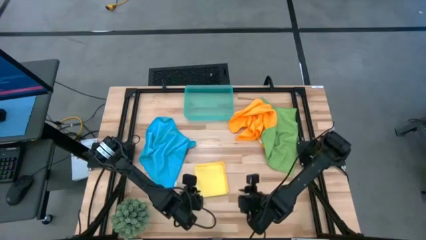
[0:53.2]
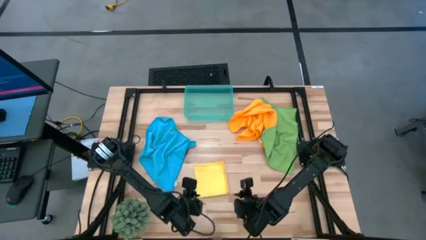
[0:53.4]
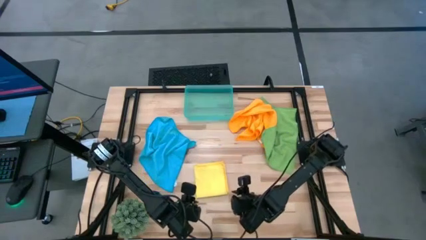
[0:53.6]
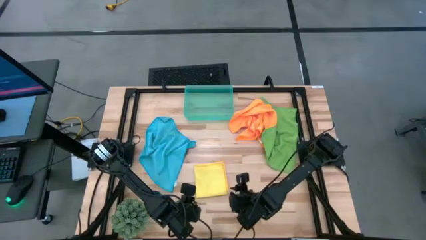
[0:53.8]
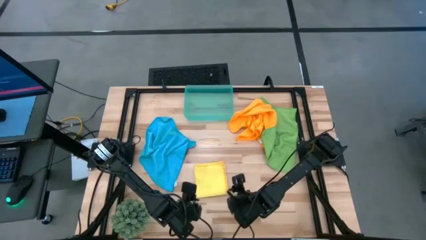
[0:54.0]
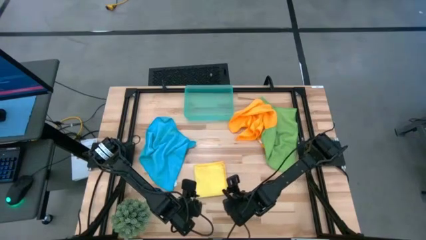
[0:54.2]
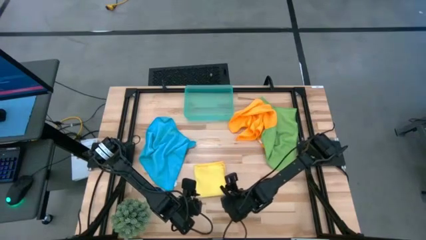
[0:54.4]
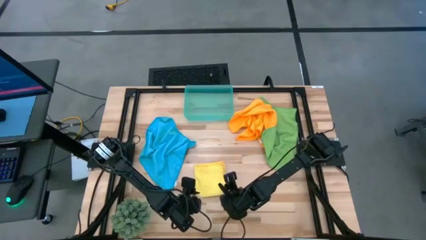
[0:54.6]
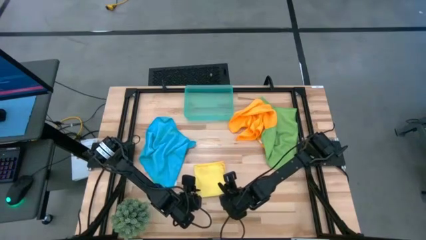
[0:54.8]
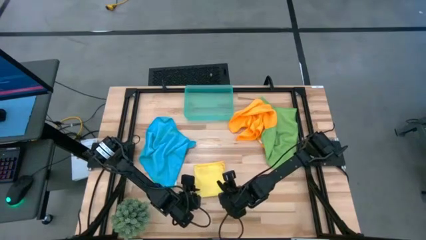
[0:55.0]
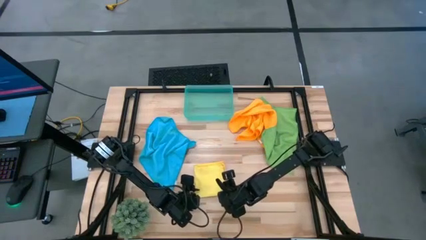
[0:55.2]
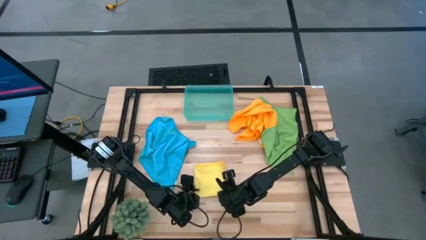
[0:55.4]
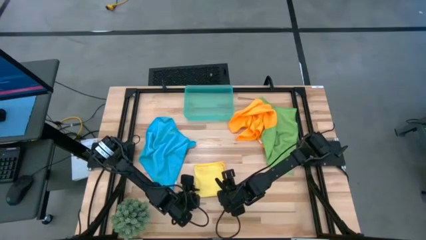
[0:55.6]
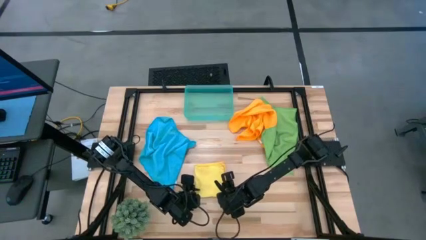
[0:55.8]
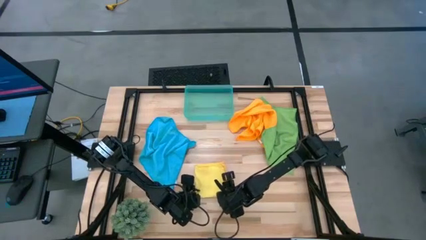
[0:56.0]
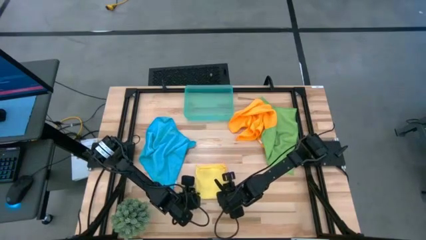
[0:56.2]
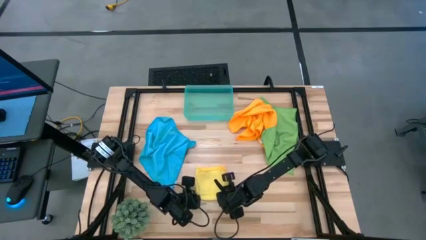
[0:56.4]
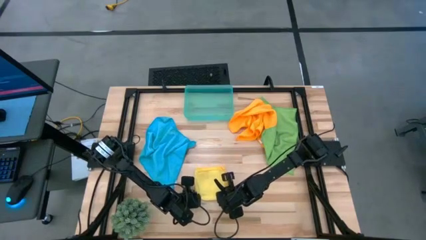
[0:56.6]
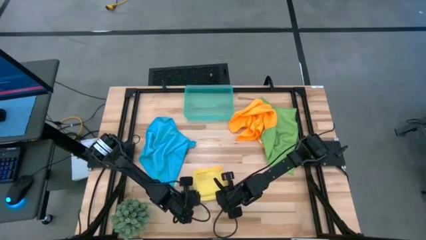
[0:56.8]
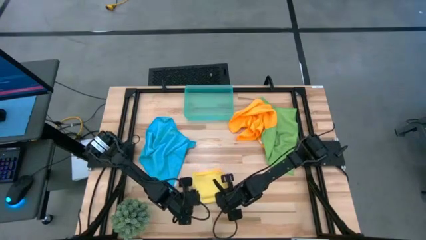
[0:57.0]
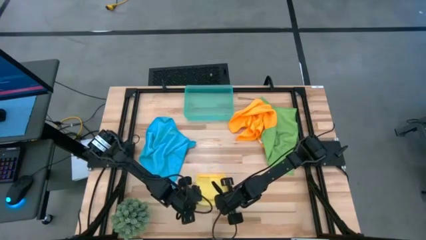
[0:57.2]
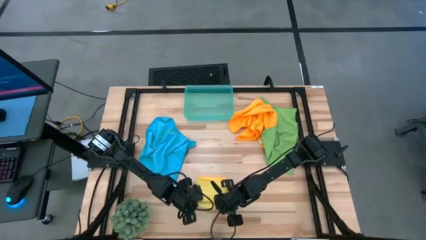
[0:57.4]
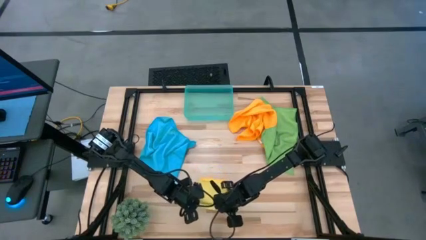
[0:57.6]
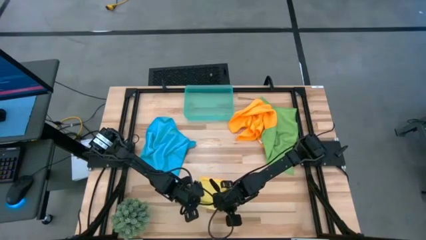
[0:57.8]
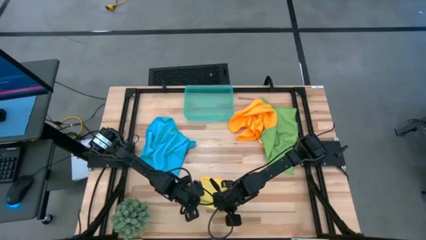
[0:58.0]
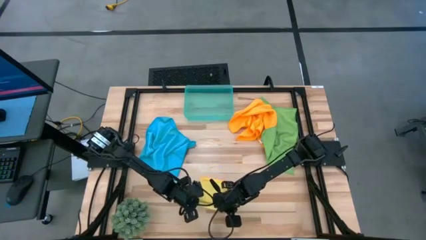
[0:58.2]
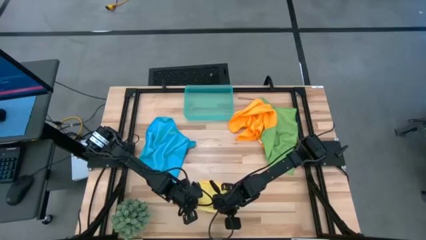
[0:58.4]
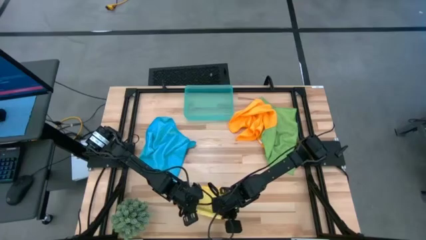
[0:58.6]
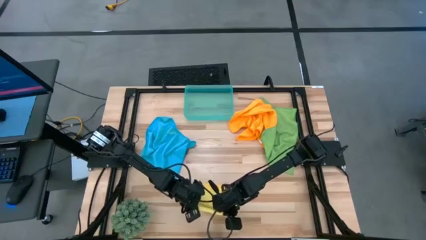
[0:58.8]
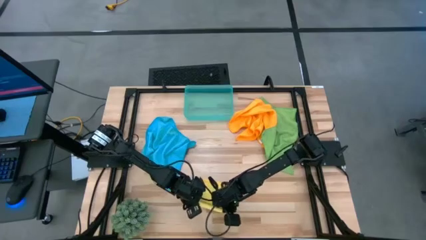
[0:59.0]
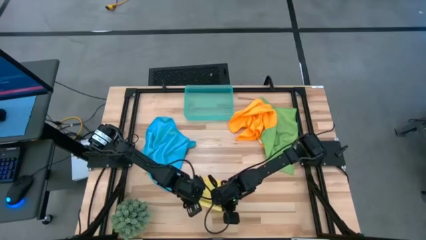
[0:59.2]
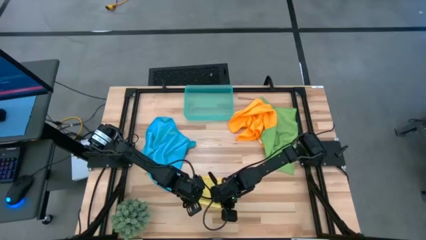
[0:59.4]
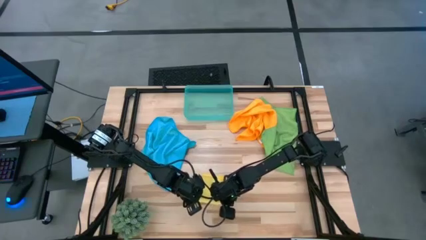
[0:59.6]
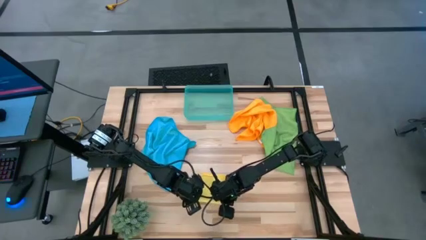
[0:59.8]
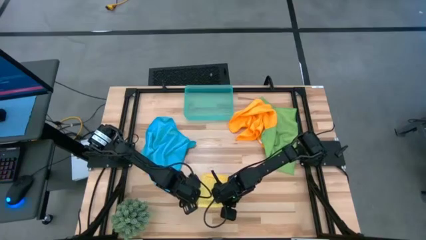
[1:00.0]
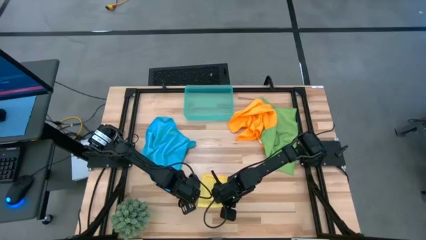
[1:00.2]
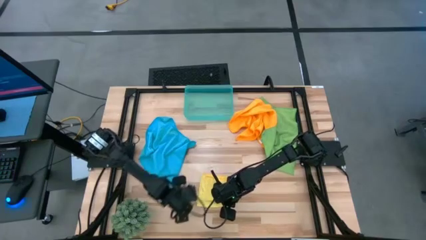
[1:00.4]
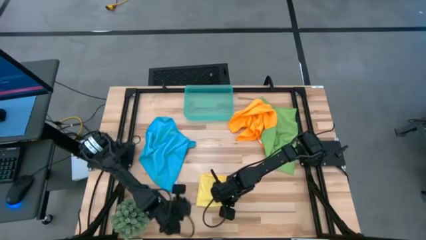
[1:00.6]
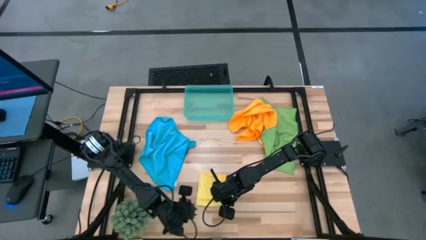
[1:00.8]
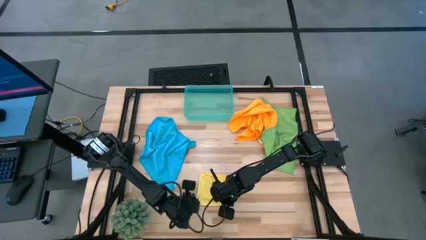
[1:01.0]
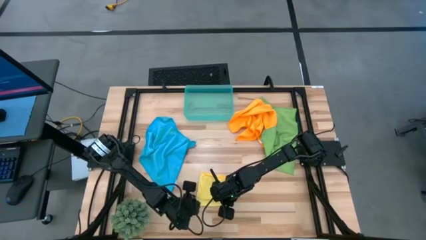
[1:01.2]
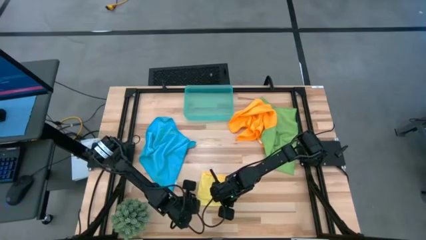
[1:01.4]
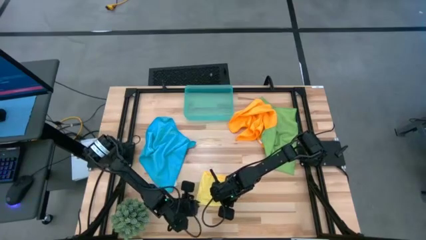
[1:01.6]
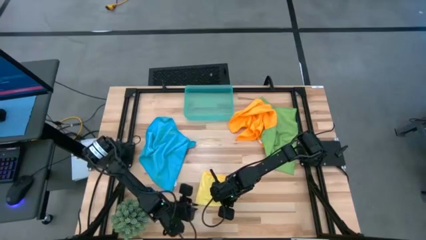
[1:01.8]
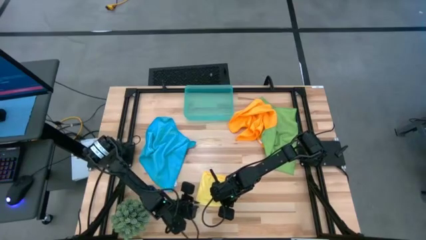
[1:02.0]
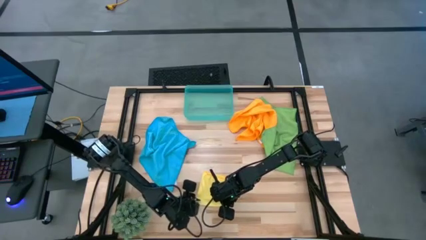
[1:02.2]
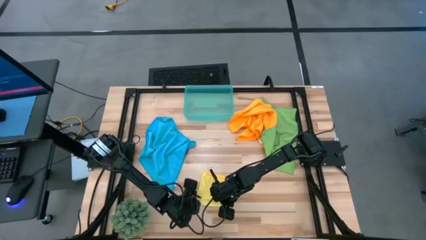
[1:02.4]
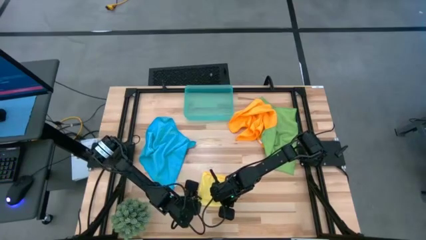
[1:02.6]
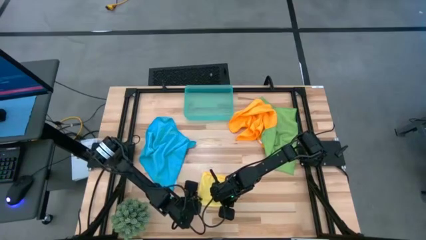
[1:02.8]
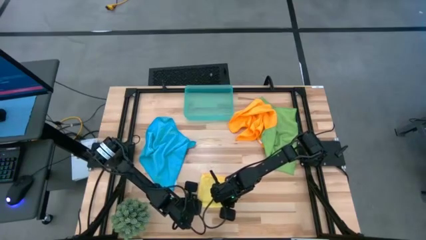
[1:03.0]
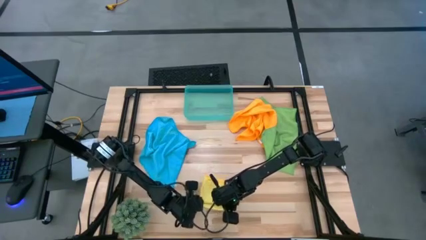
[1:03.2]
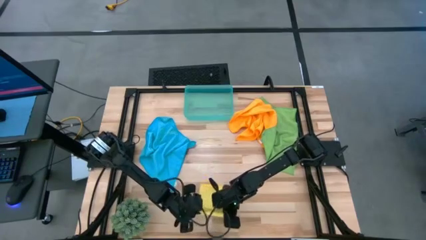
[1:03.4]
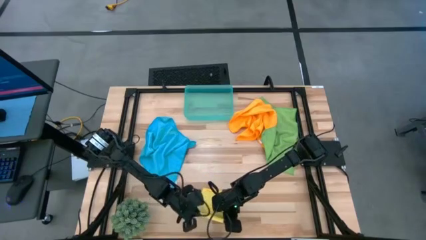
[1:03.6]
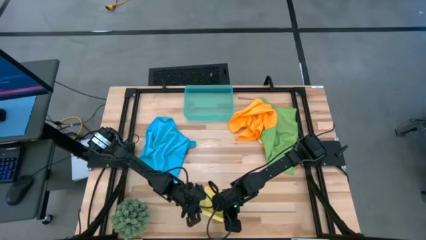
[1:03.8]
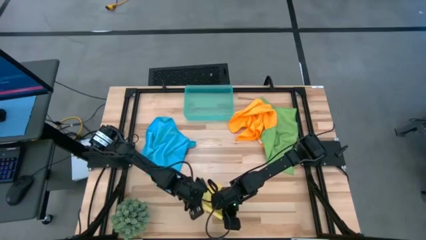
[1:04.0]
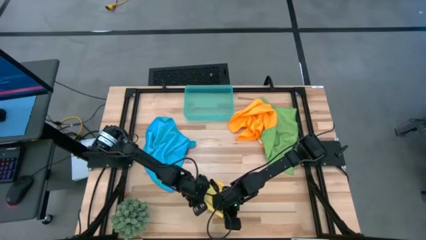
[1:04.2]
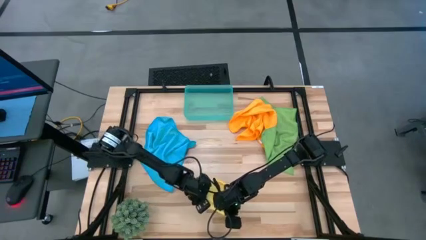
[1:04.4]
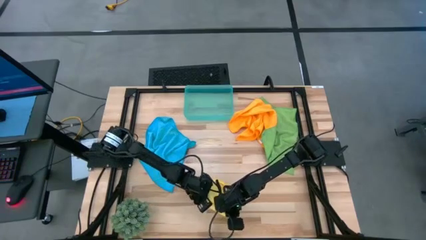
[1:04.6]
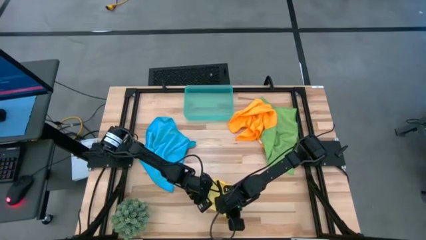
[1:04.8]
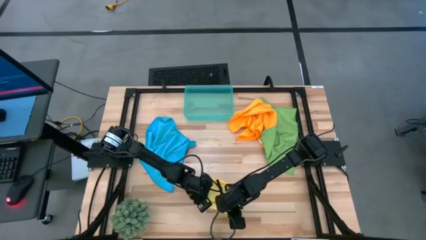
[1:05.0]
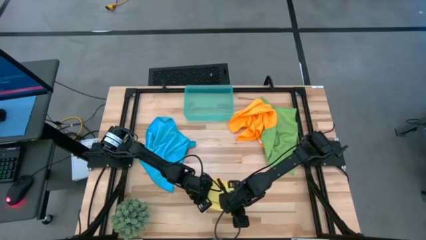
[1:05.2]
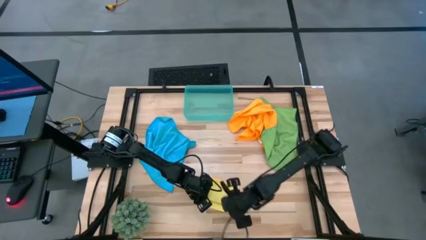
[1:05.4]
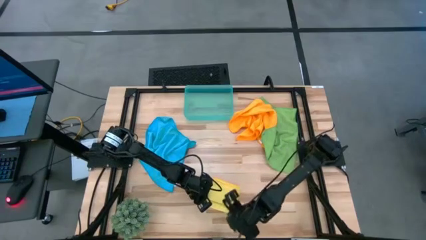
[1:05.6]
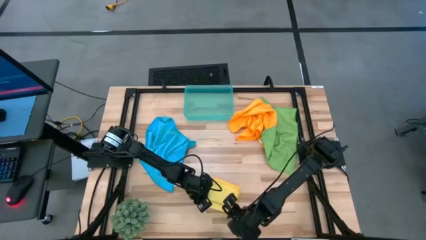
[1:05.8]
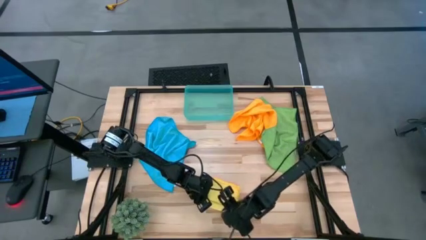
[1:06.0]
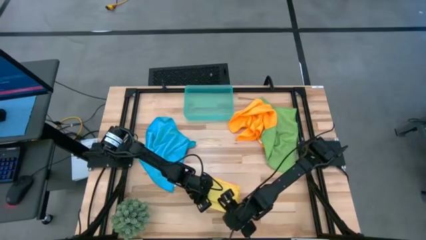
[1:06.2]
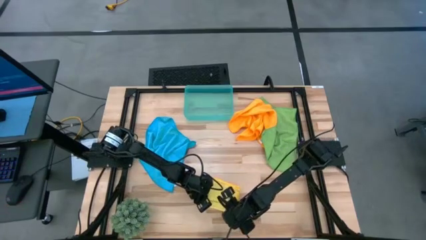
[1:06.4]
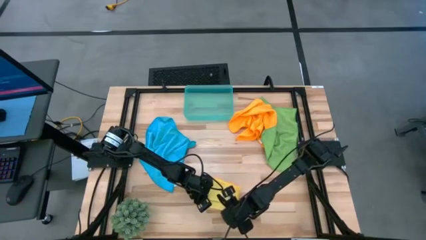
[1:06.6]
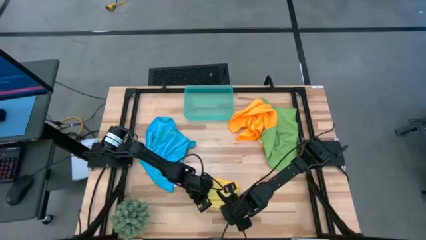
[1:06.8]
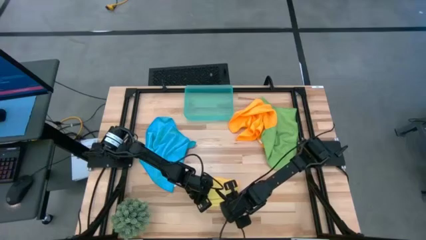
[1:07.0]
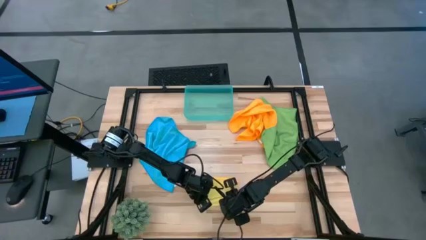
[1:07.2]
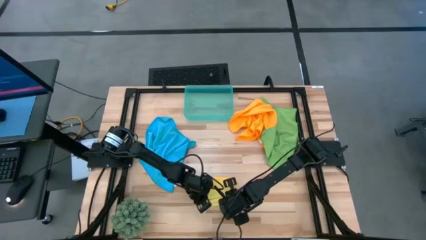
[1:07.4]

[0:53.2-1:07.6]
Task: Roll microfiber towels into tight, uniform cylinder then place into a basket
Roll the yellow microfiber towel
